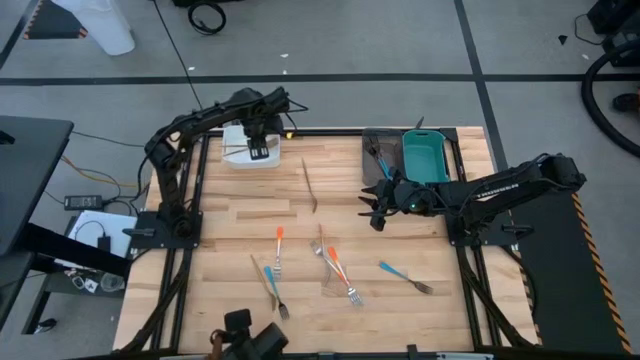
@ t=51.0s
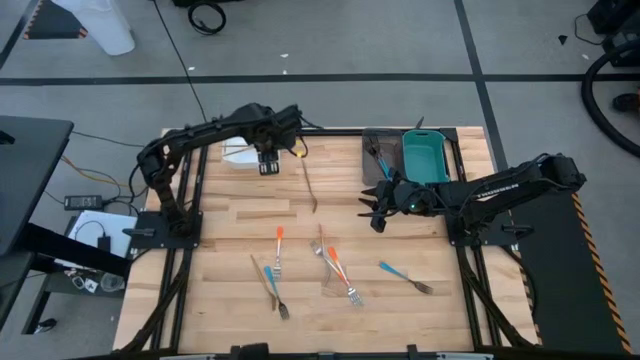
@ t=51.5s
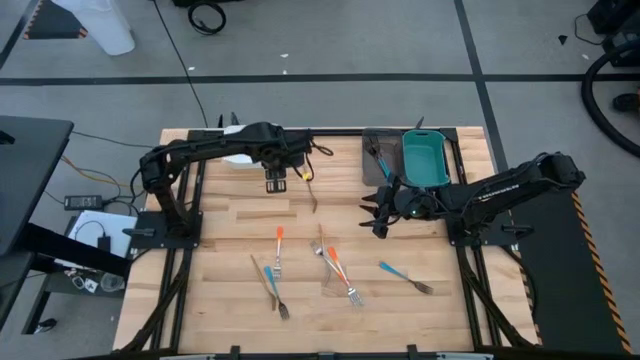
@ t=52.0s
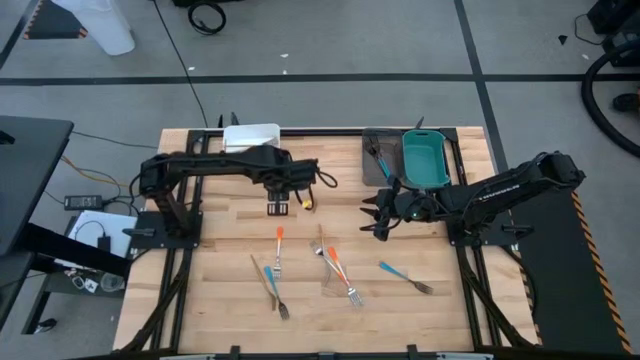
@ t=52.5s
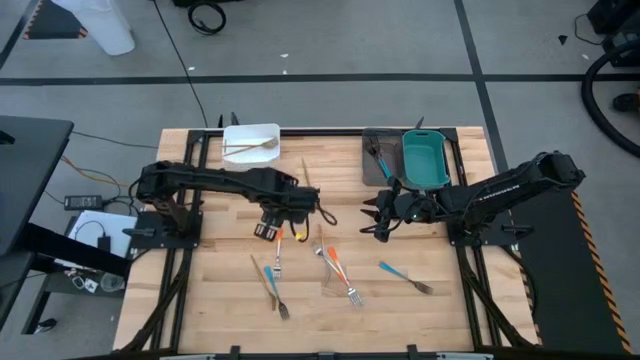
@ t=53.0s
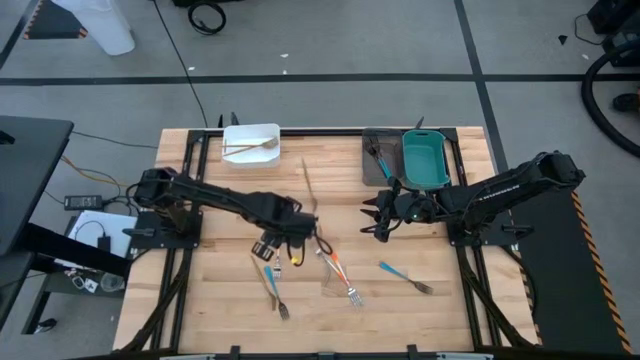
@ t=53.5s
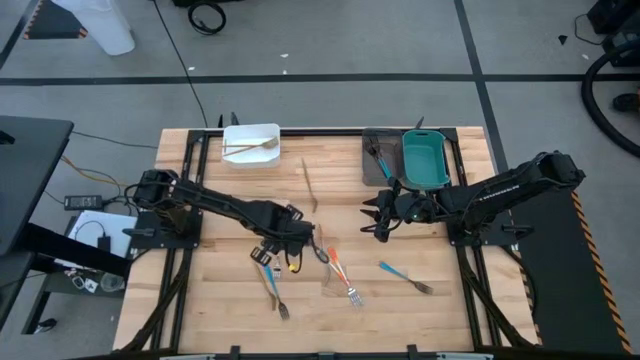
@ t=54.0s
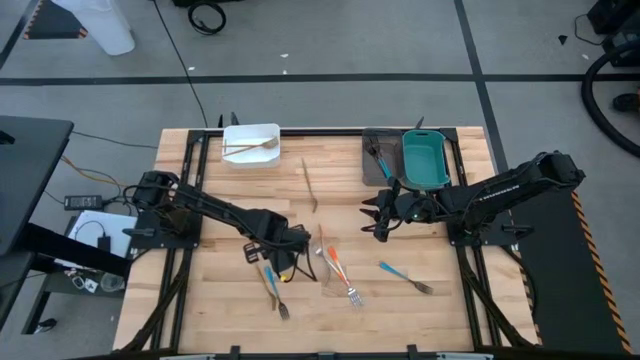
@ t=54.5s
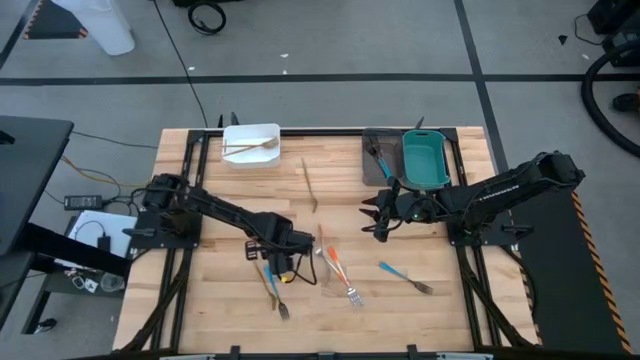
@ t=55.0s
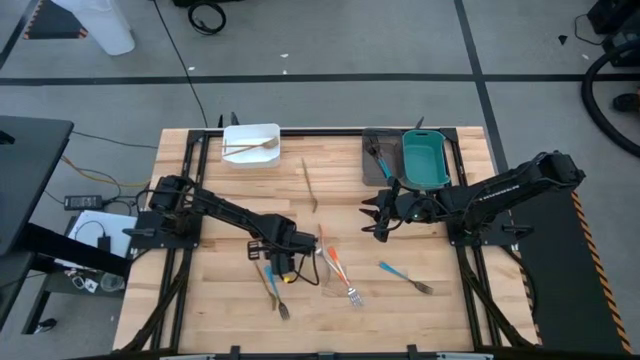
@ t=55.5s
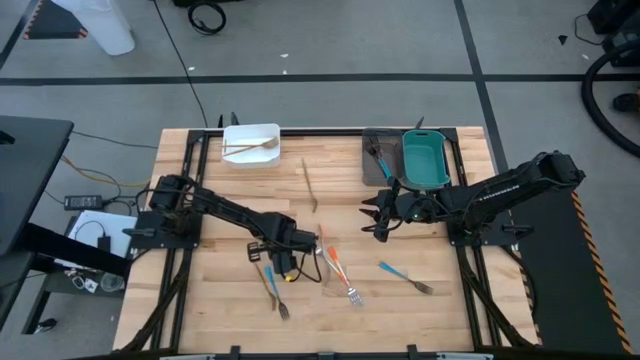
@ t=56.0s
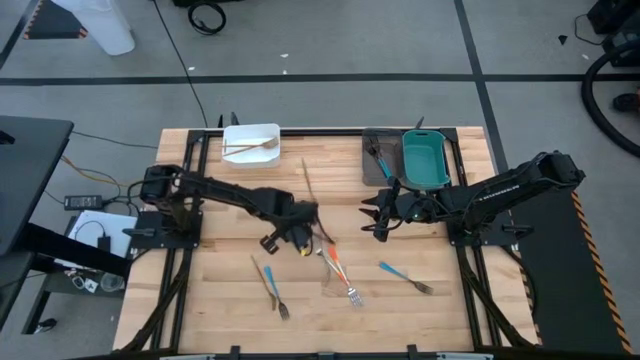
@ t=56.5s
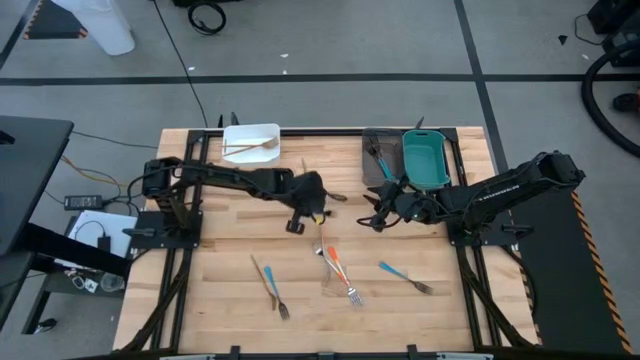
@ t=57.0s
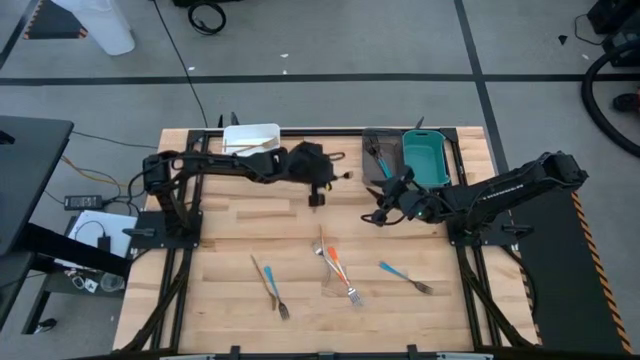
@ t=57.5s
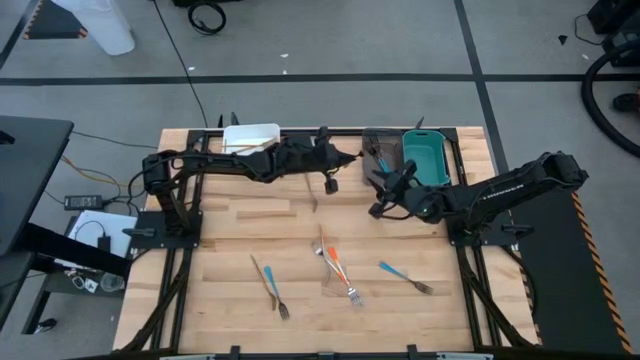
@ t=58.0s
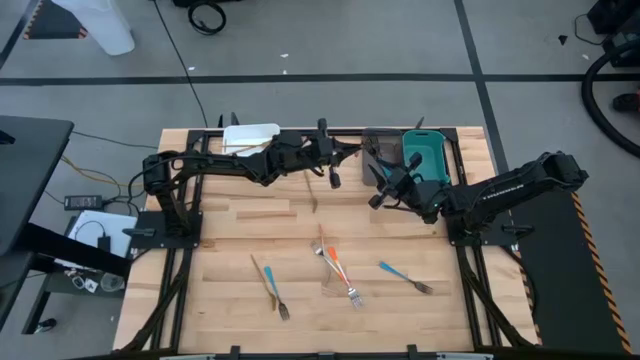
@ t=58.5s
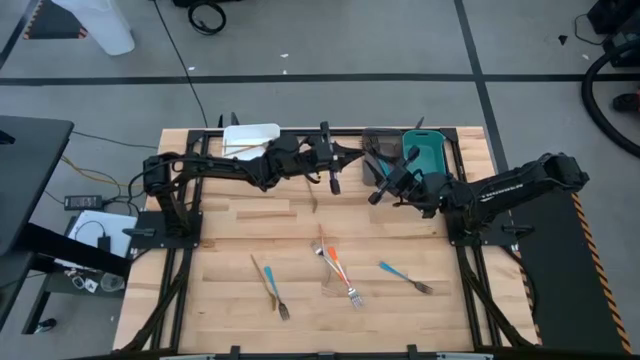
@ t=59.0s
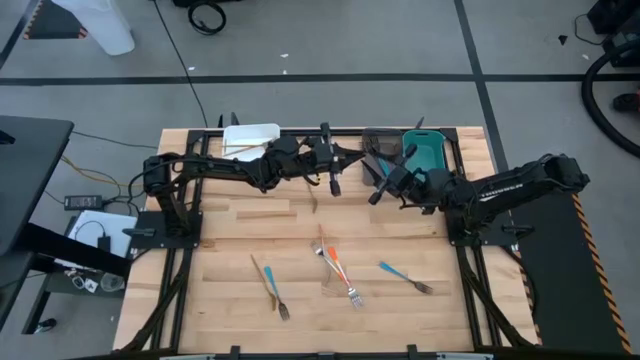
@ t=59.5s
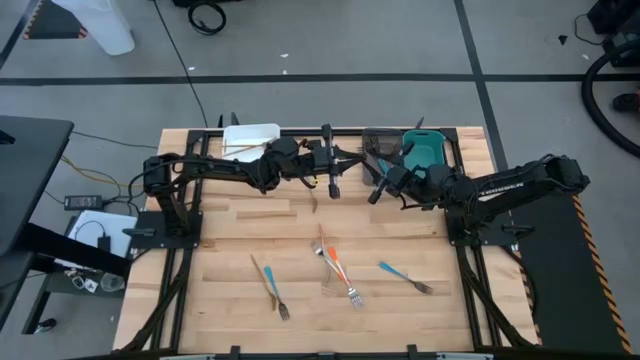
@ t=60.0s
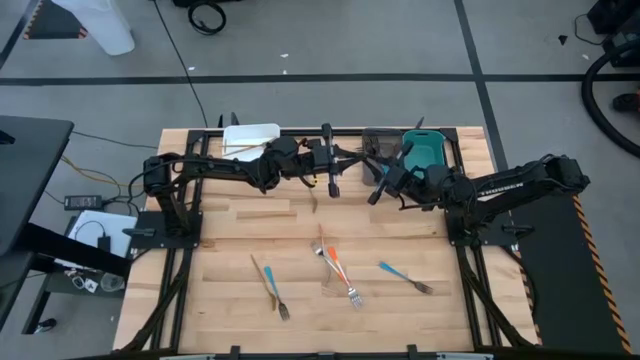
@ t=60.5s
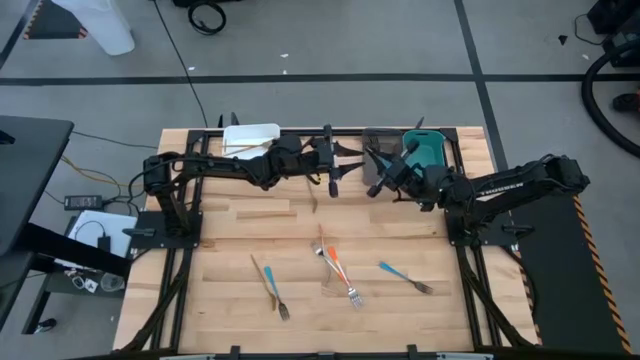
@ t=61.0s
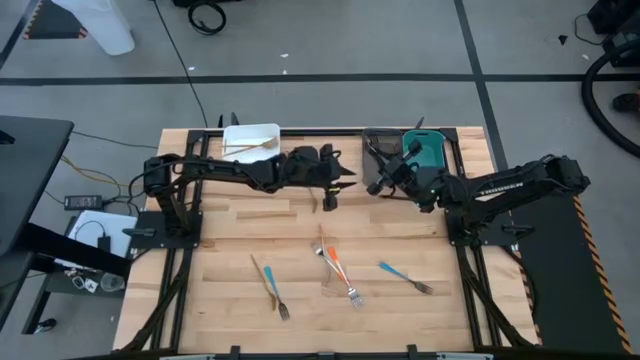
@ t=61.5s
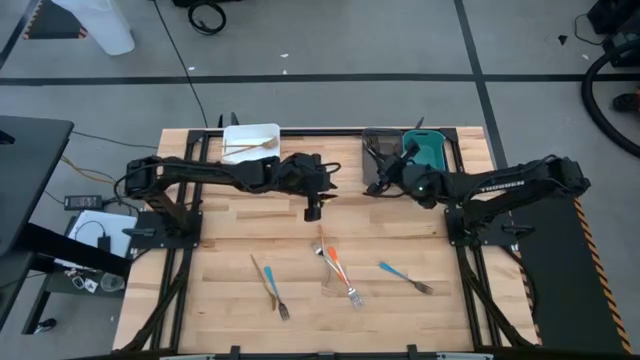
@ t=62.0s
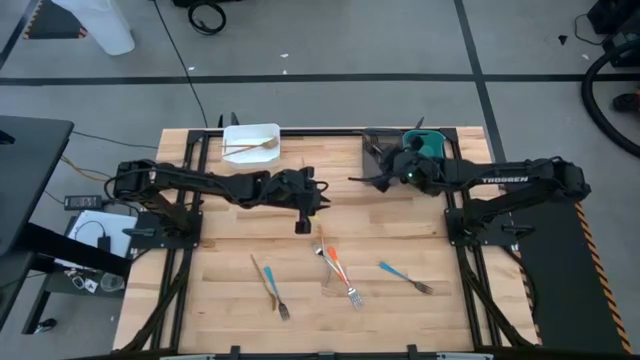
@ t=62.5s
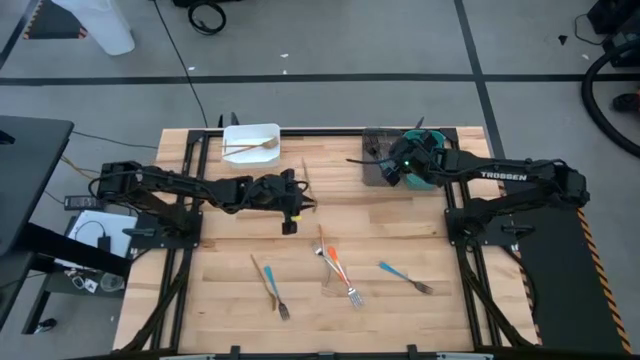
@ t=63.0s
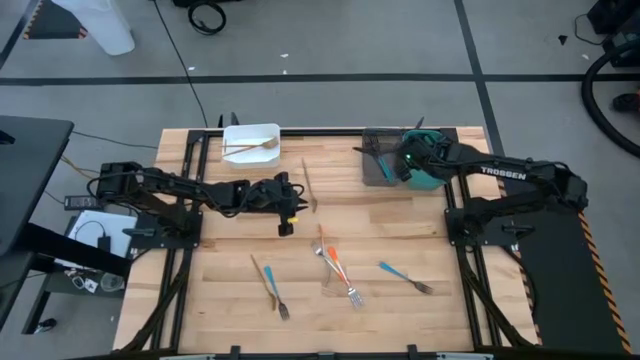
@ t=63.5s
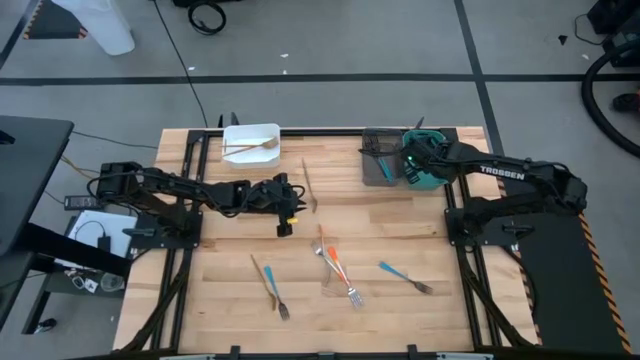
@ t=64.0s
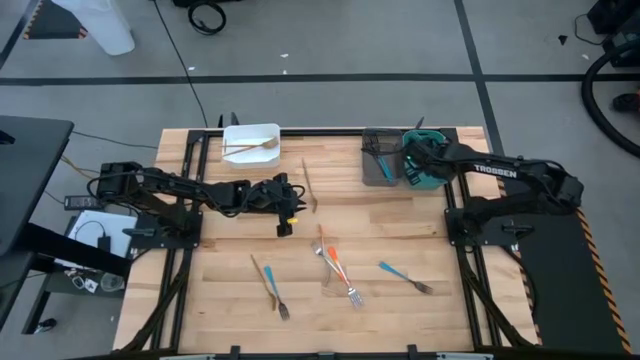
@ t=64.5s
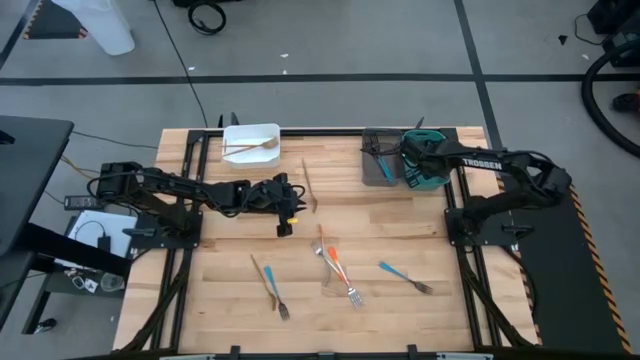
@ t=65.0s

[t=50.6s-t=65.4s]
Task: Sort silverware by color (type)
Put the left orange fork into the green bin

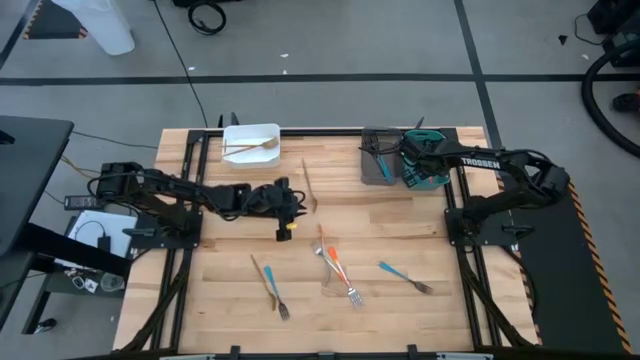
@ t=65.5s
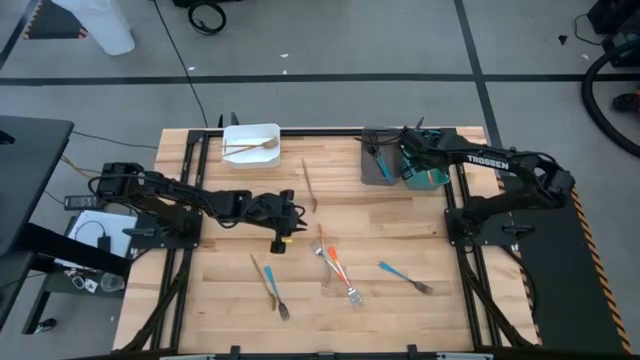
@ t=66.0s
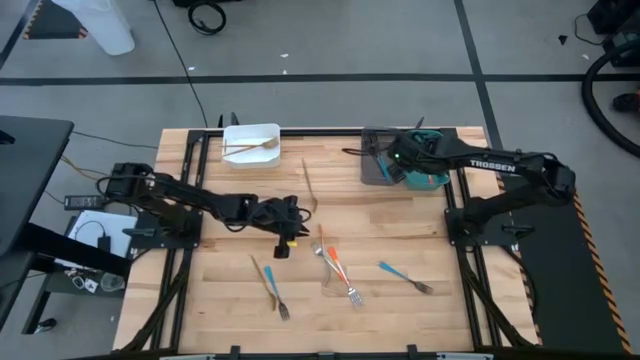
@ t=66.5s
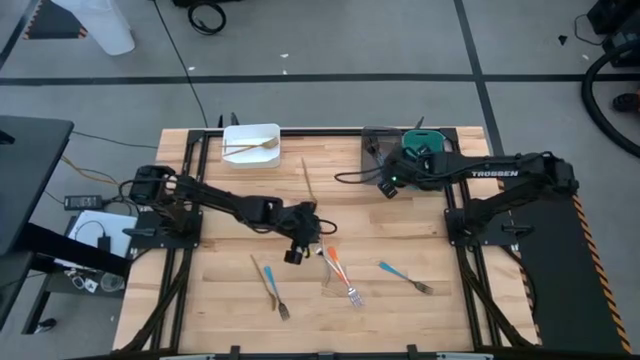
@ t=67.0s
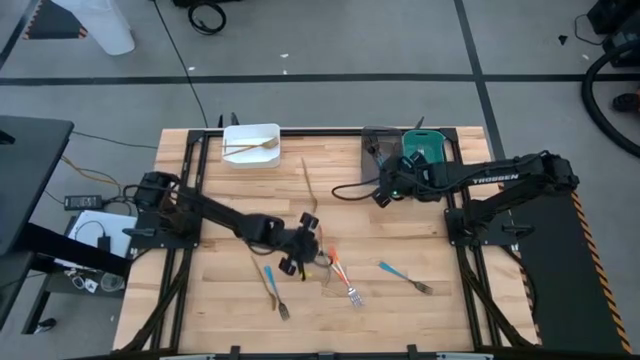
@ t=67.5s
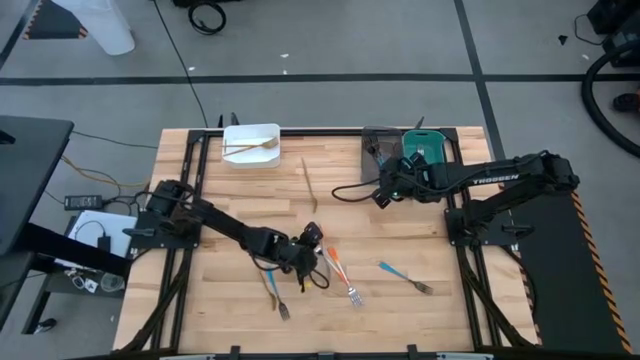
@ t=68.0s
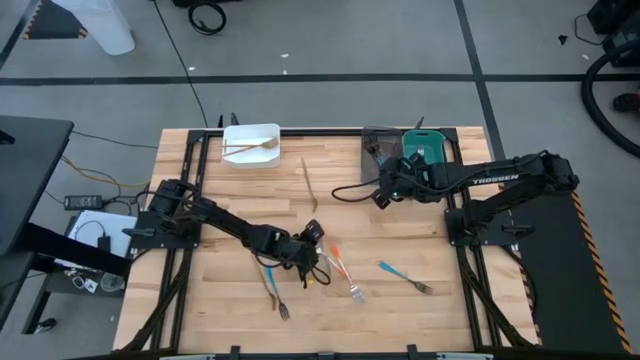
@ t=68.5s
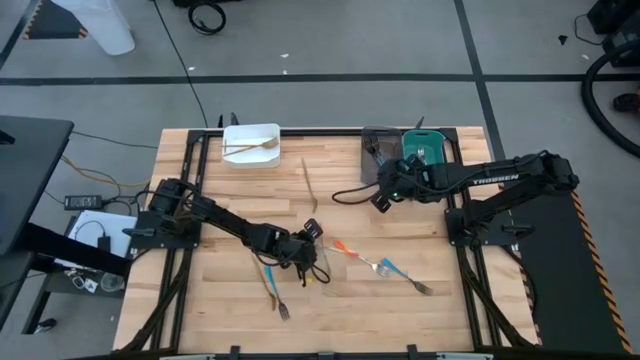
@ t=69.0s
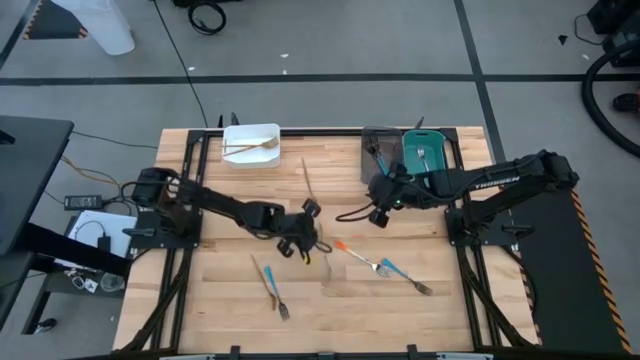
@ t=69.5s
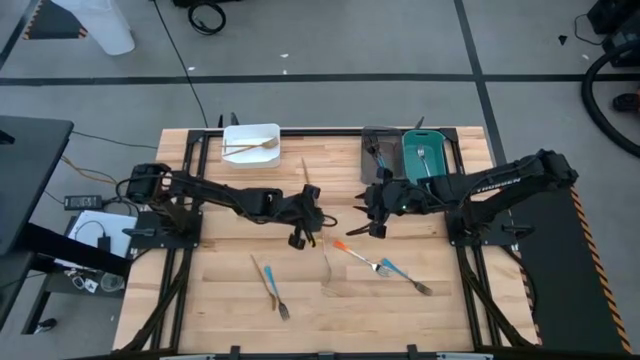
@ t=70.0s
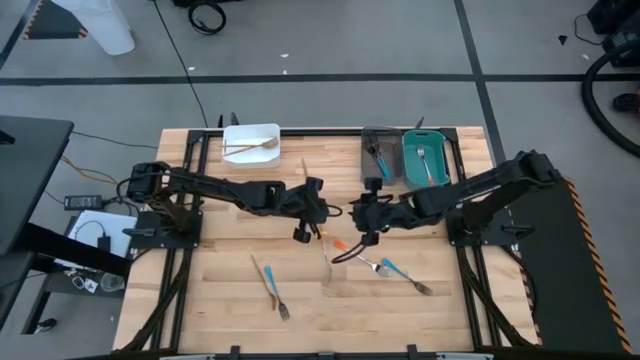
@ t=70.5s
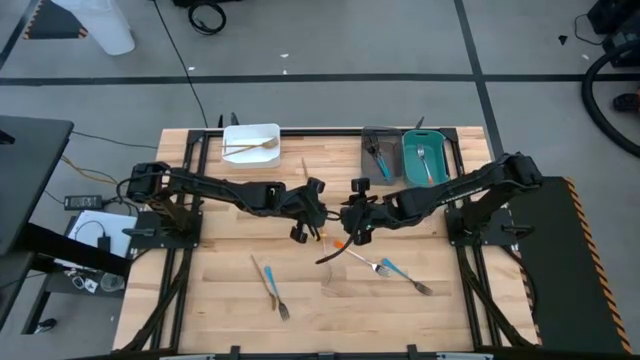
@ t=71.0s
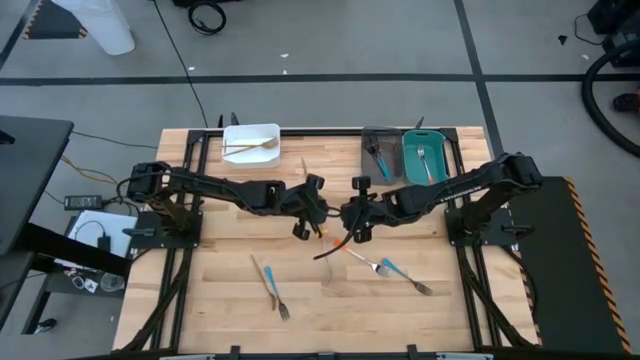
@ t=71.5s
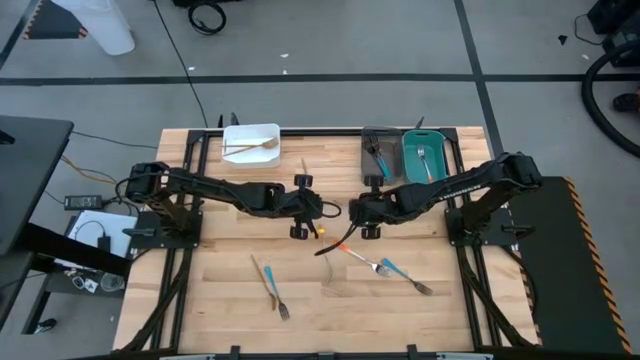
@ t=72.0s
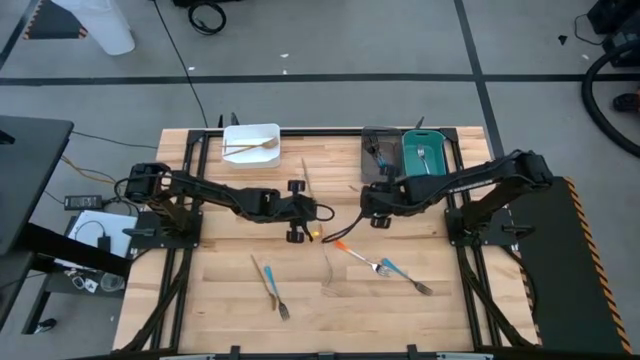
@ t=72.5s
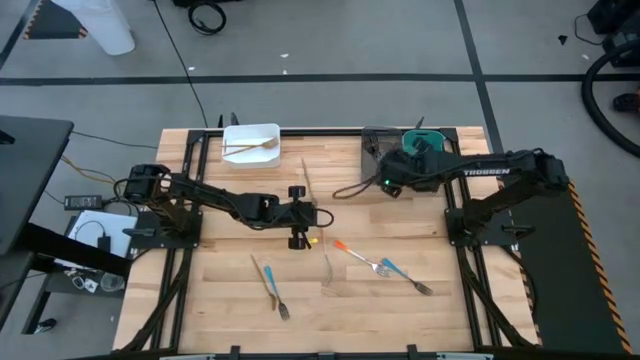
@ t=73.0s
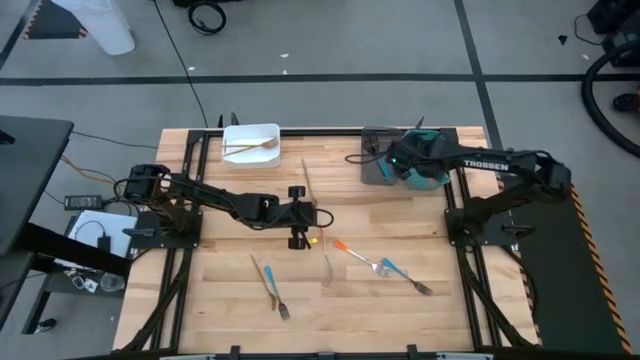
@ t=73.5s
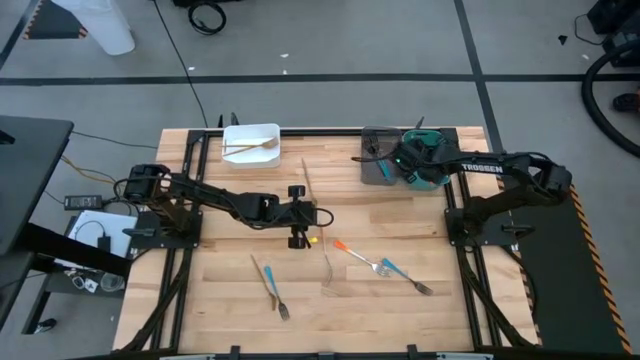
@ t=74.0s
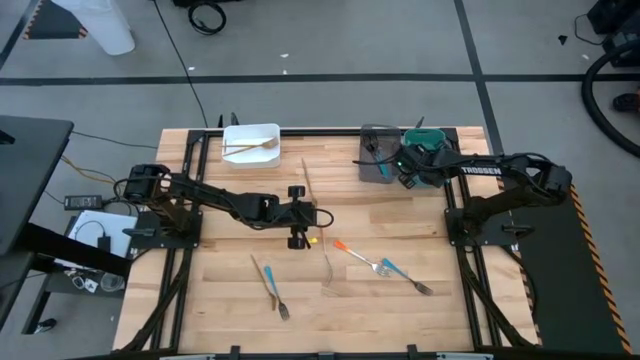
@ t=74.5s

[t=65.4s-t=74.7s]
Put the center orange fork into the green bin
